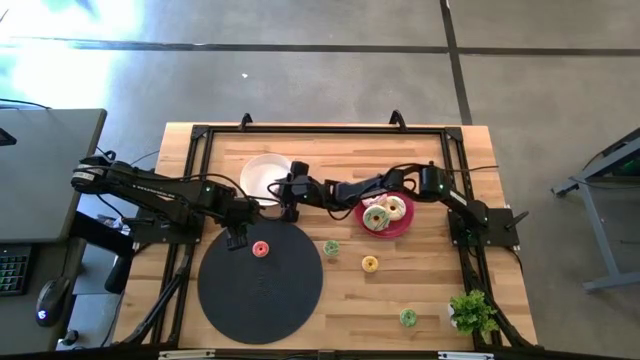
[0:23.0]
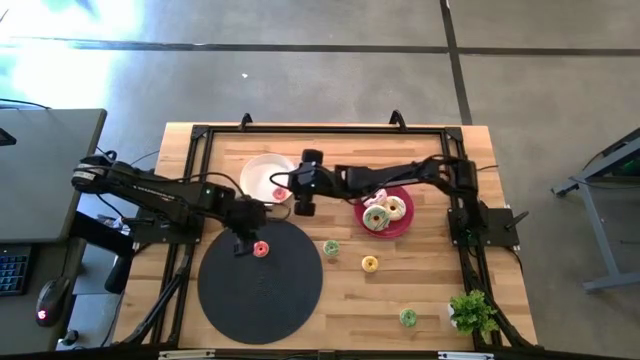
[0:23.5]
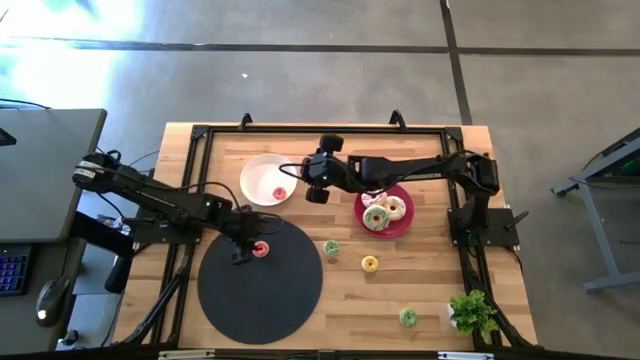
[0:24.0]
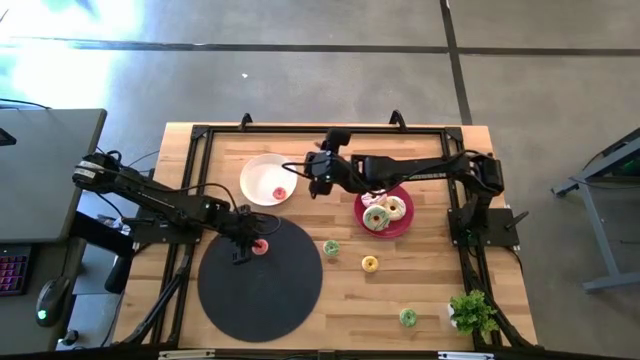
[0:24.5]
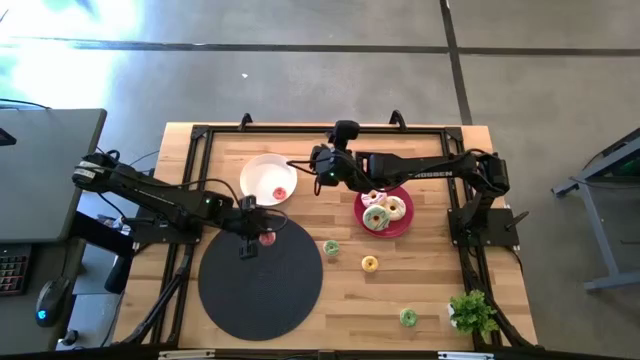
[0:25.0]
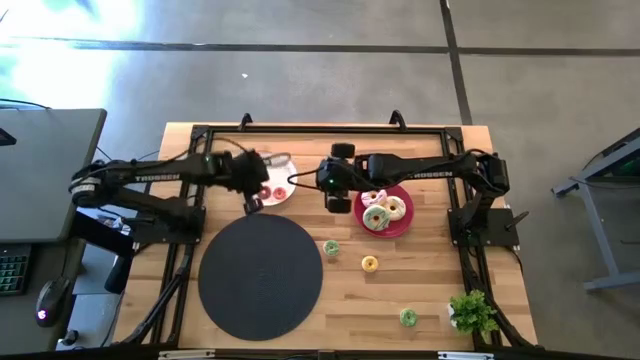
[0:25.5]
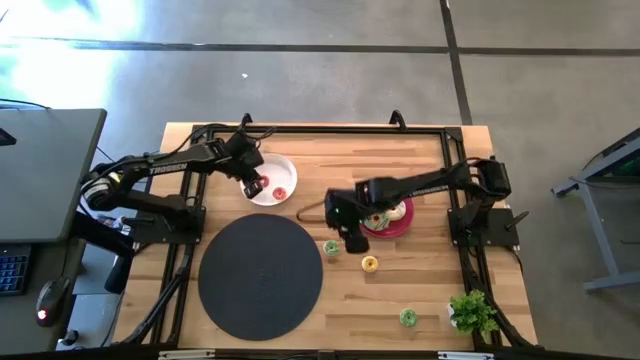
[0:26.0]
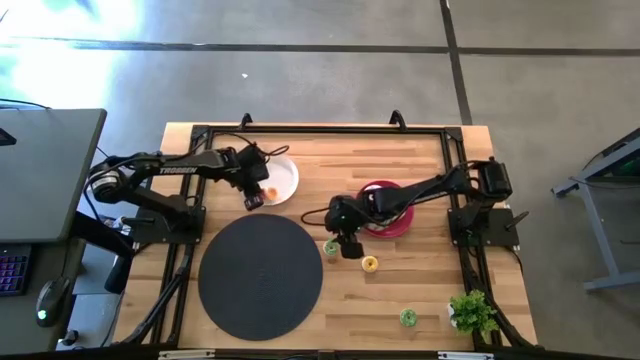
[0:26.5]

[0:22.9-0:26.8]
Task: Pick & Place donuts
Put the small pink donut on the white plate

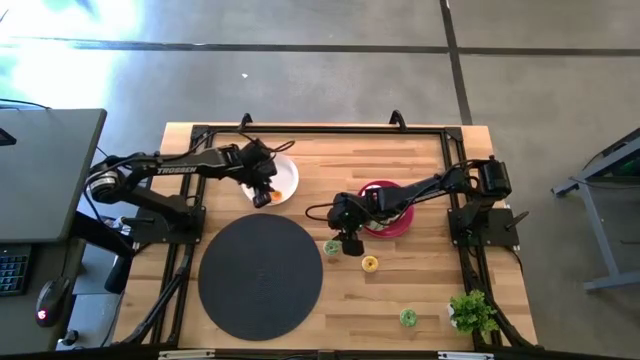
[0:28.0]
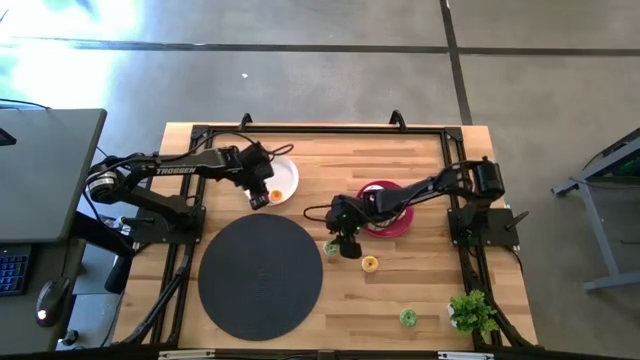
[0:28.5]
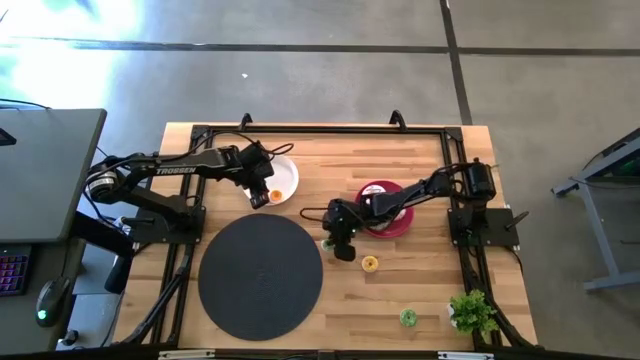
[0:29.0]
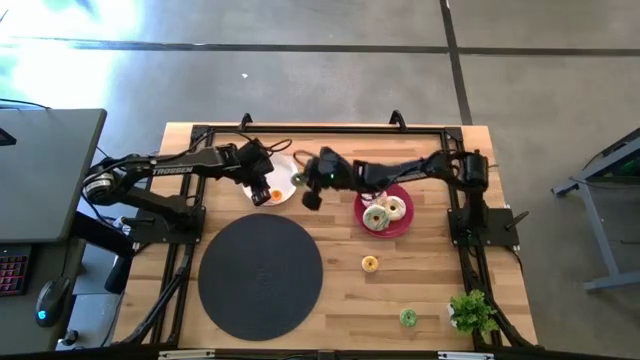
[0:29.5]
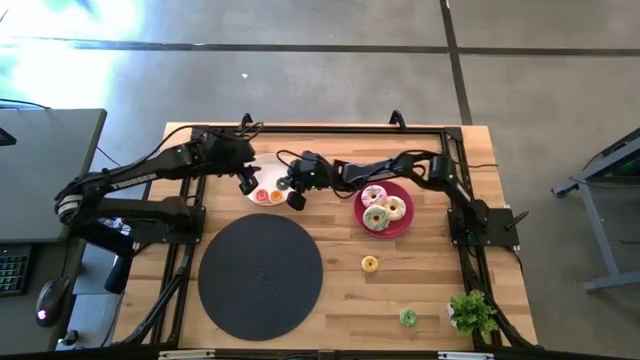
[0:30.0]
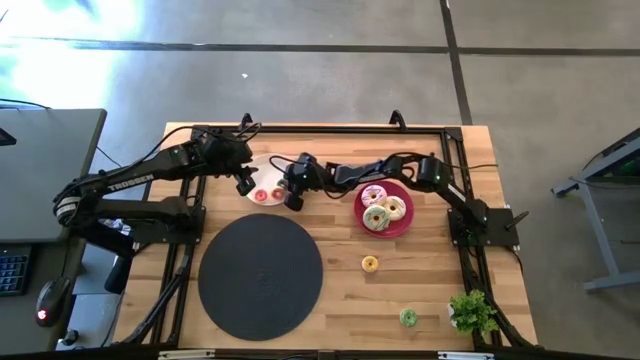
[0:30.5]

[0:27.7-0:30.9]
Put the top small green donut on the white plate

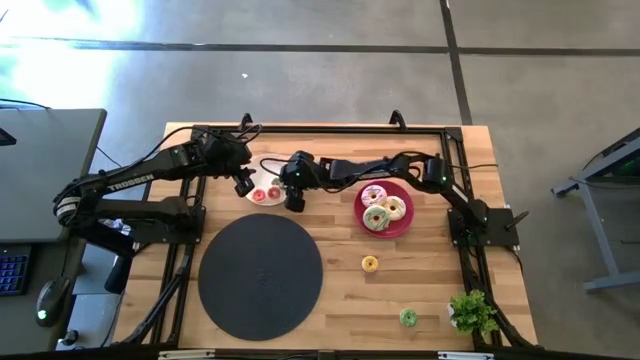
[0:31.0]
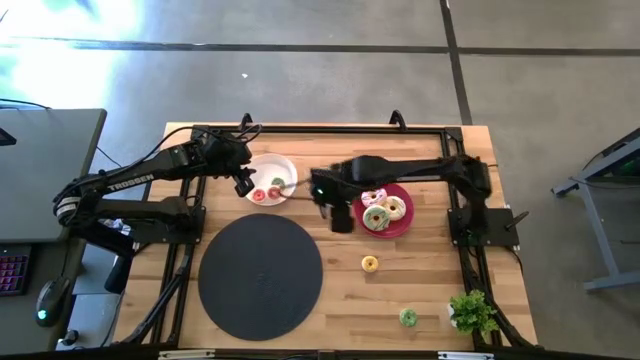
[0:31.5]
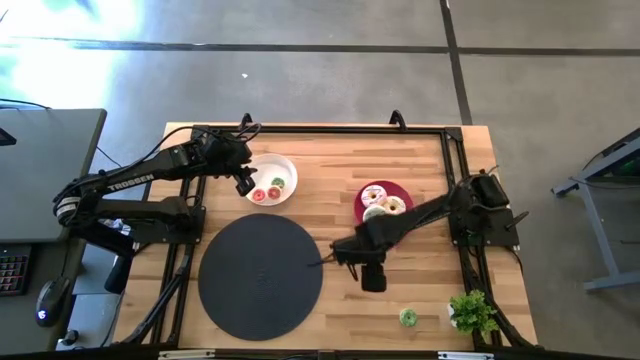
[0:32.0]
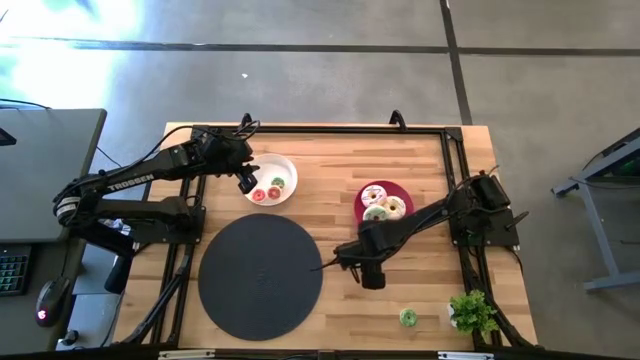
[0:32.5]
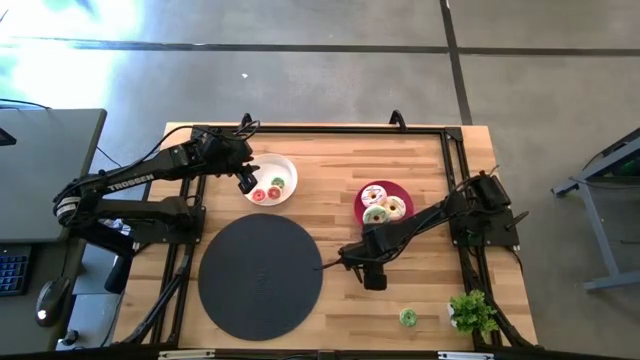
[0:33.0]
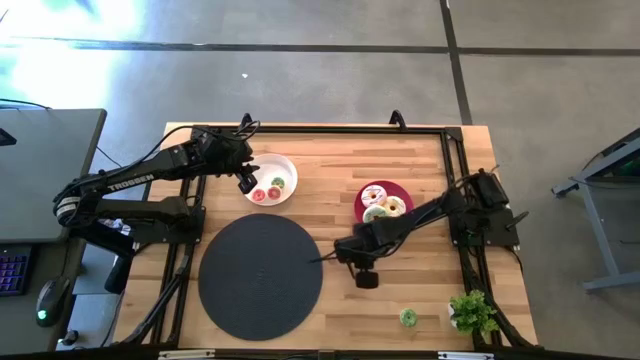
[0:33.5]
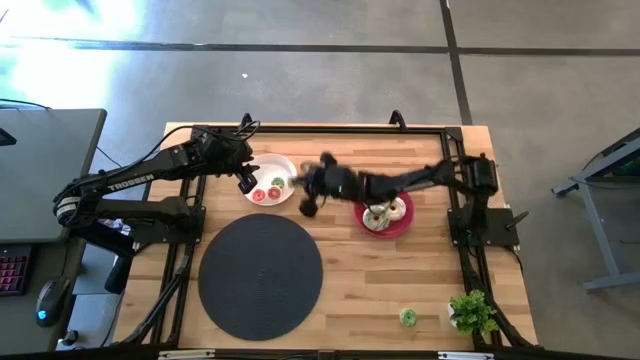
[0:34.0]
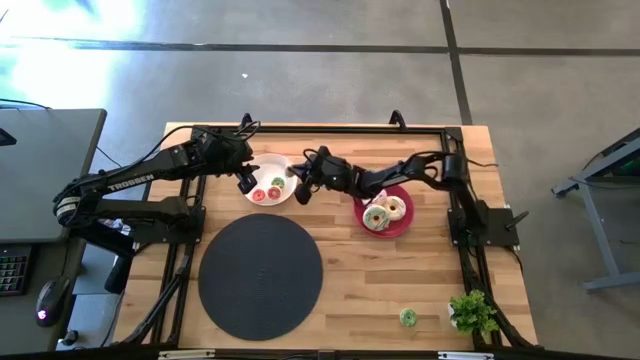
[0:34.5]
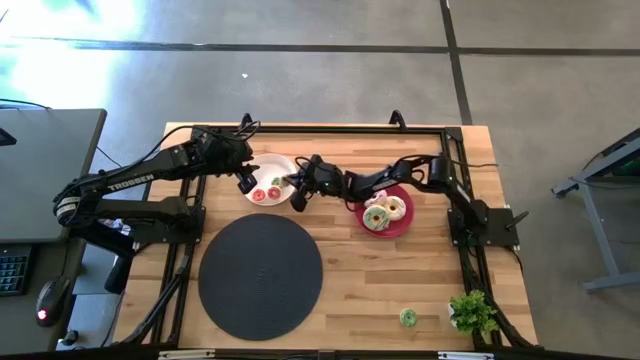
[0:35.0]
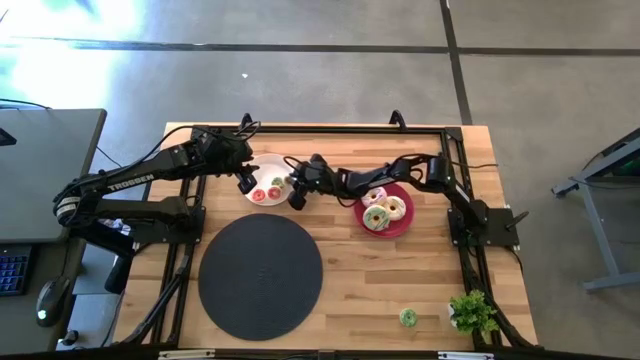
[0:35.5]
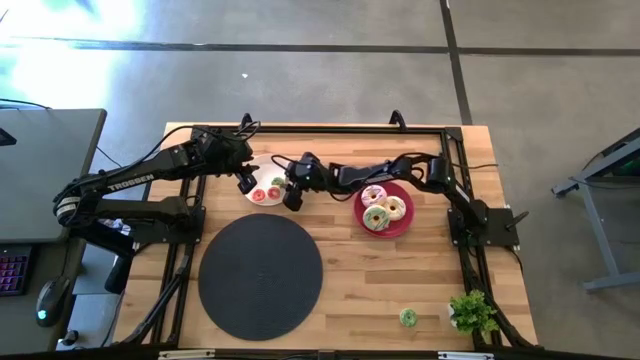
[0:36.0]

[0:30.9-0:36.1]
Put the small yellow donut on the white plate

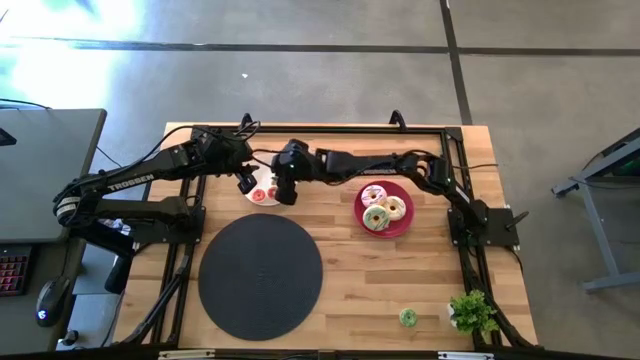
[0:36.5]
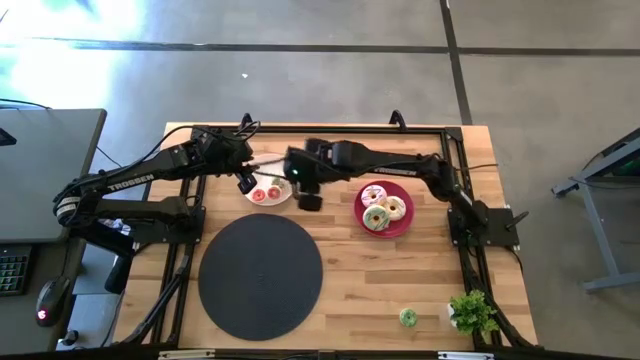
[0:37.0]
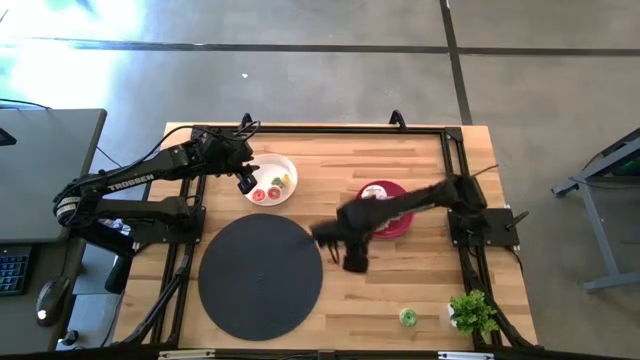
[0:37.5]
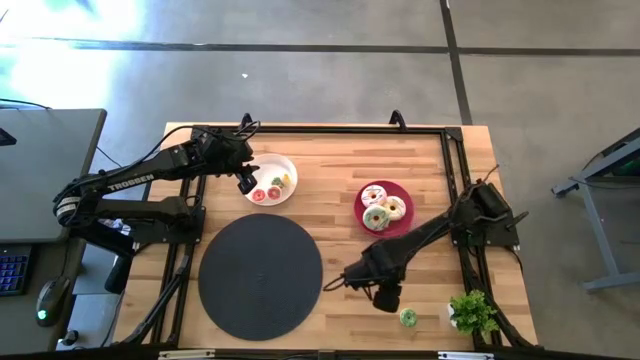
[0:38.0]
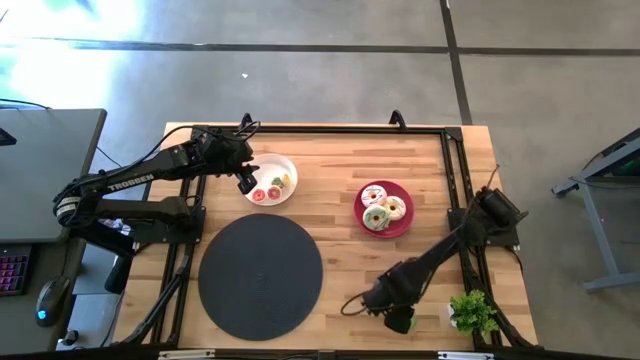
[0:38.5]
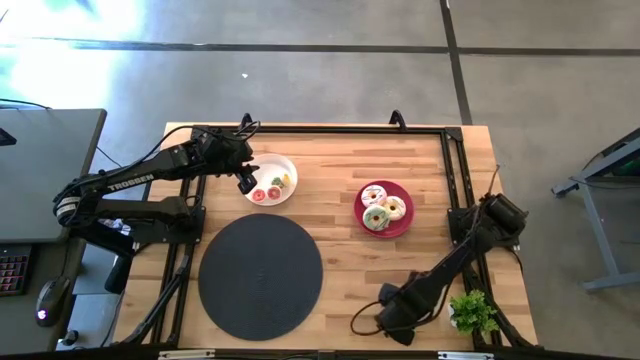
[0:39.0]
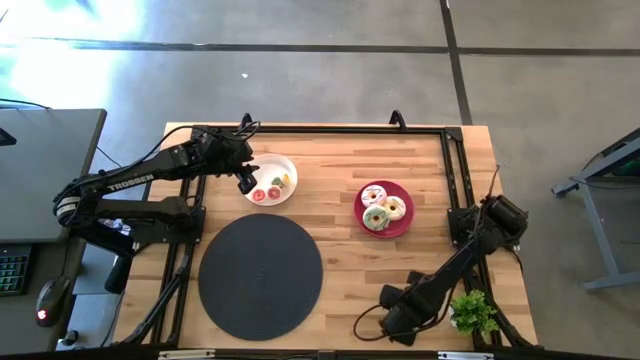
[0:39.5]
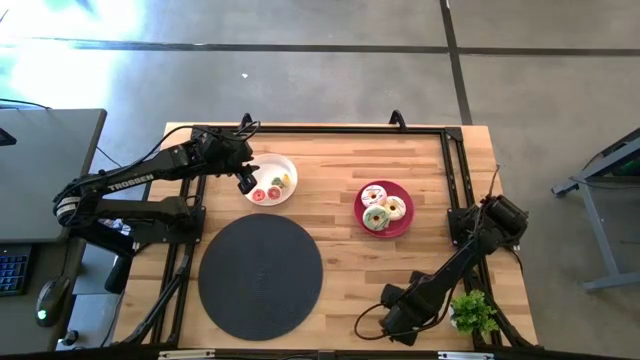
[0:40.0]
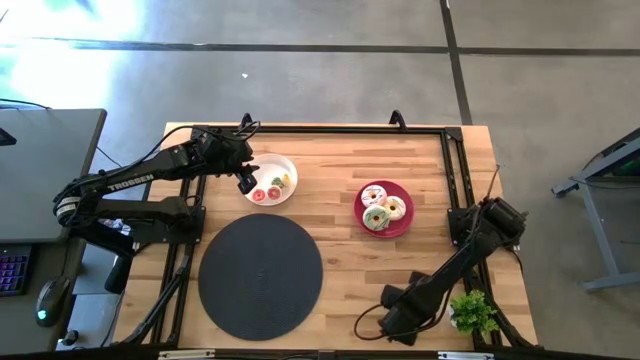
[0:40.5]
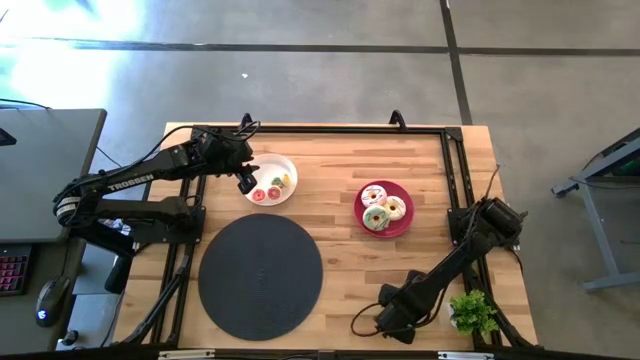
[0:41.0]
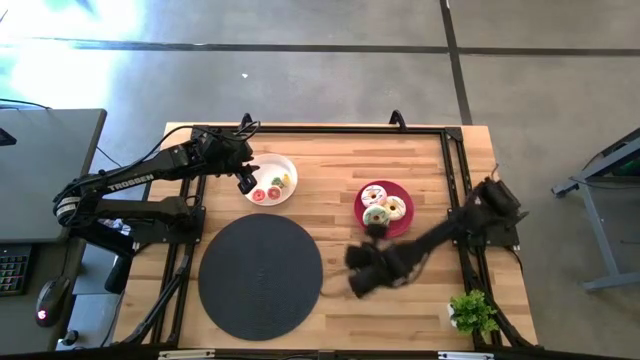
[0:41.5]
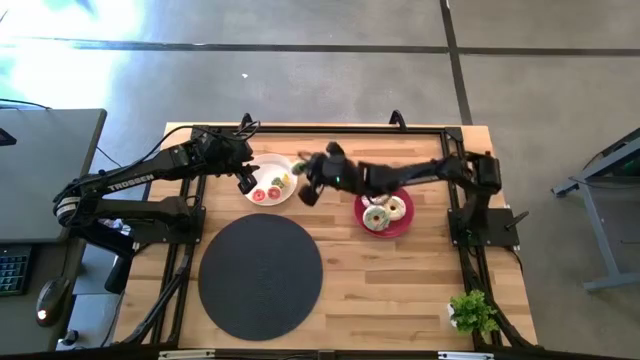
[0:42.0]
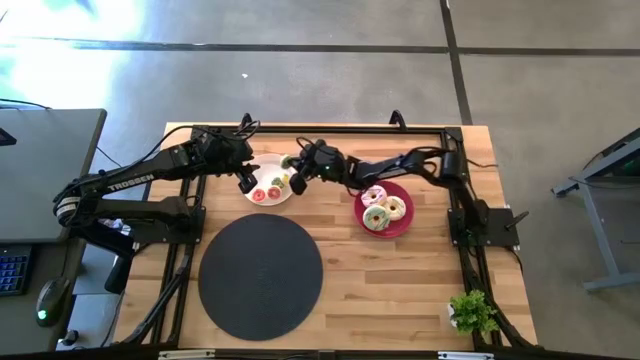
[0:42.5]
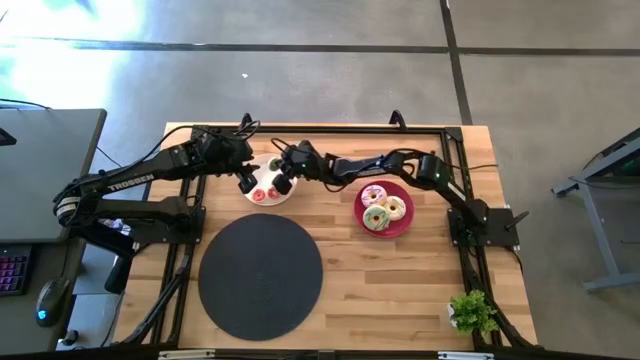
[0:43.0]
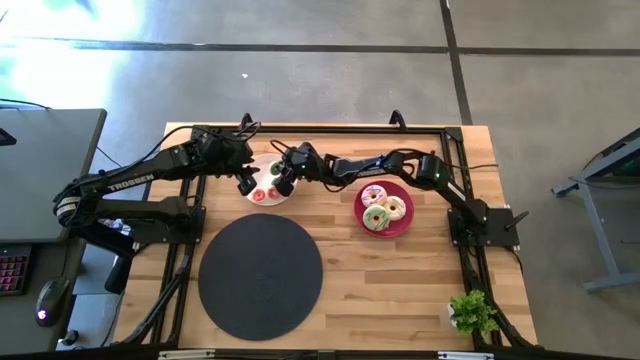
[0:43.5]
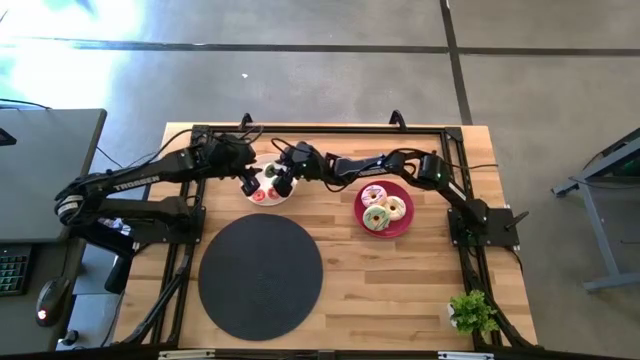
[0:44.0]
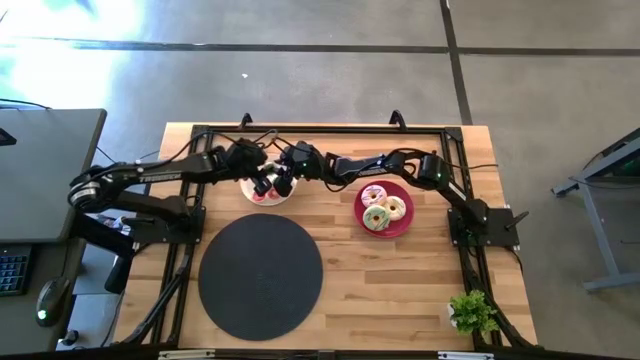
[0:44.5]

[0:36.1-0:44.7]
Put the small green donut on the white plate
